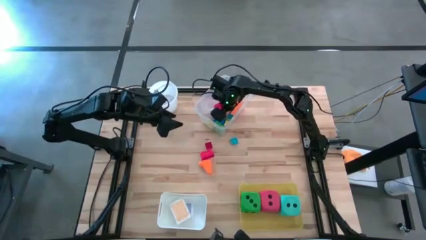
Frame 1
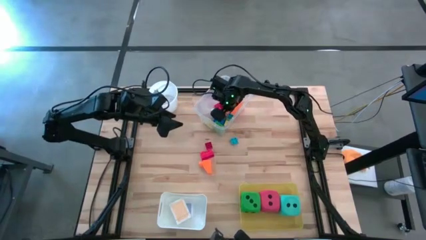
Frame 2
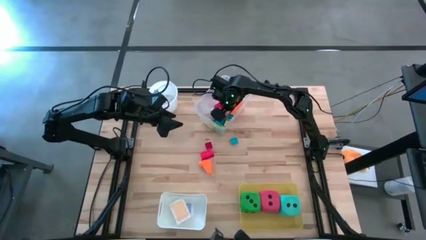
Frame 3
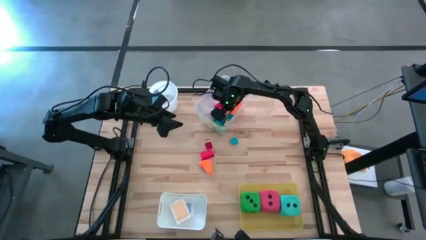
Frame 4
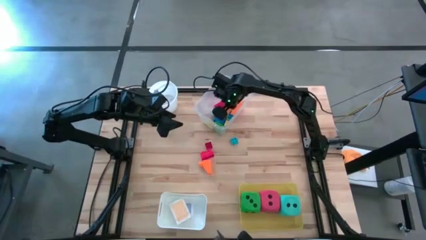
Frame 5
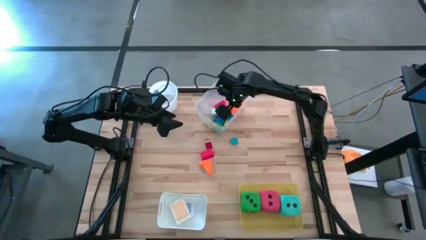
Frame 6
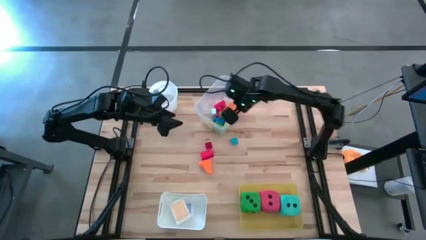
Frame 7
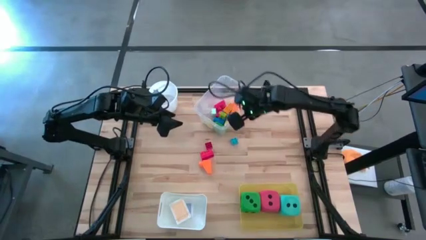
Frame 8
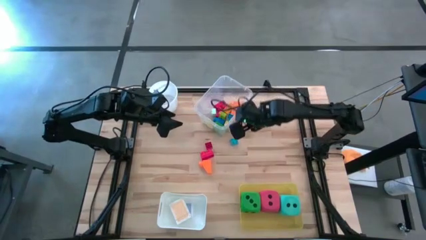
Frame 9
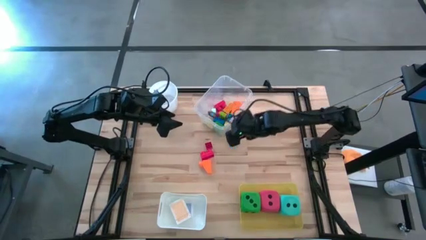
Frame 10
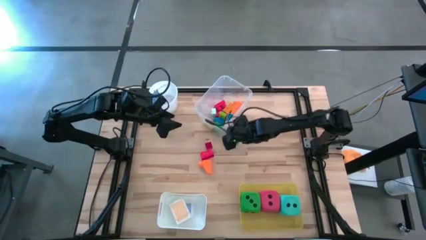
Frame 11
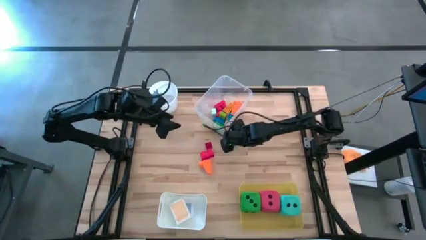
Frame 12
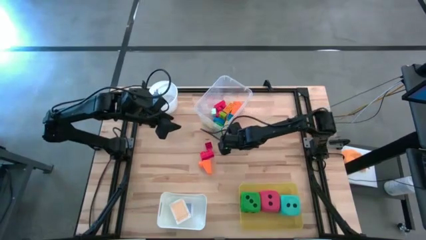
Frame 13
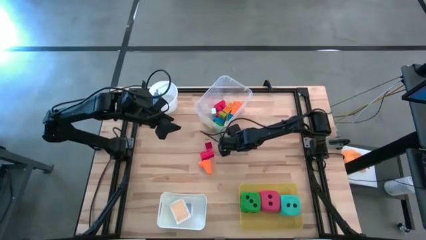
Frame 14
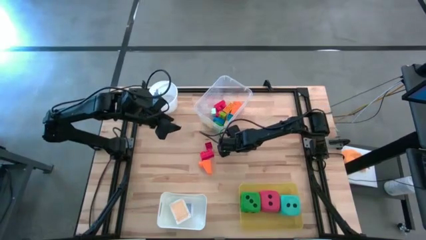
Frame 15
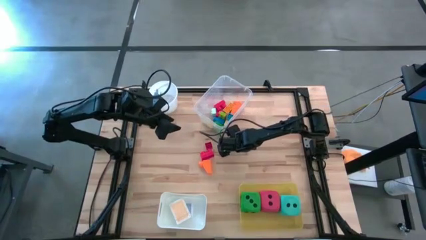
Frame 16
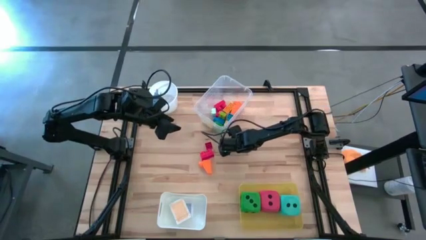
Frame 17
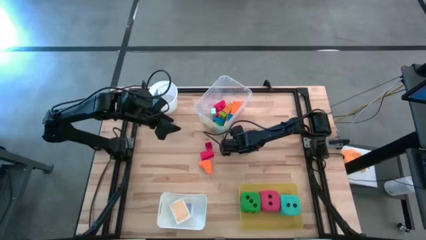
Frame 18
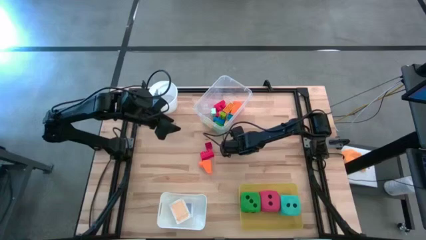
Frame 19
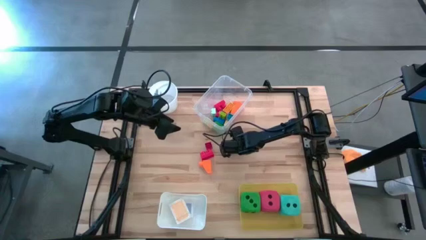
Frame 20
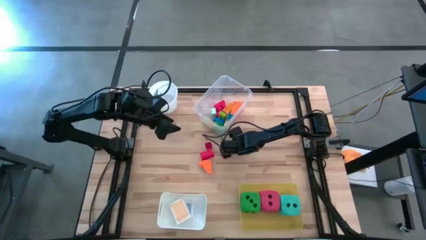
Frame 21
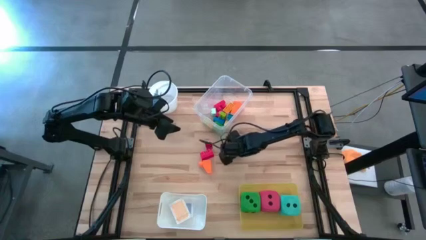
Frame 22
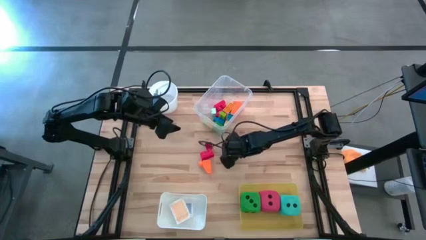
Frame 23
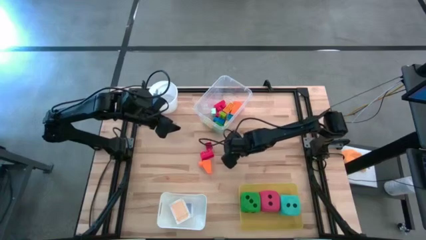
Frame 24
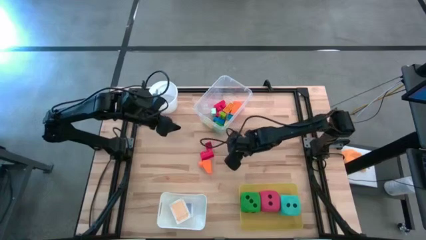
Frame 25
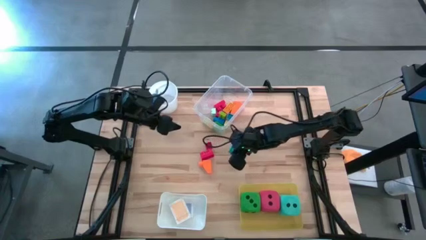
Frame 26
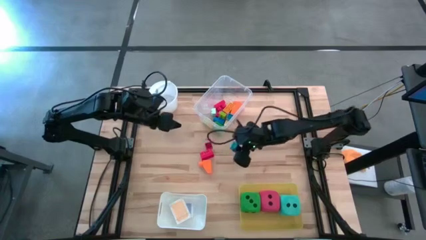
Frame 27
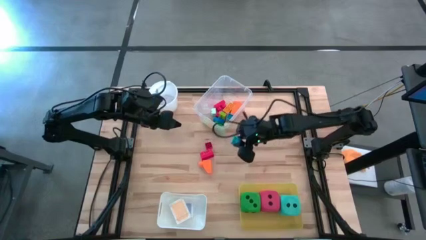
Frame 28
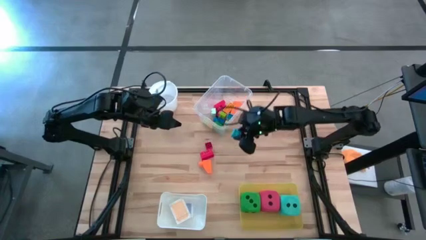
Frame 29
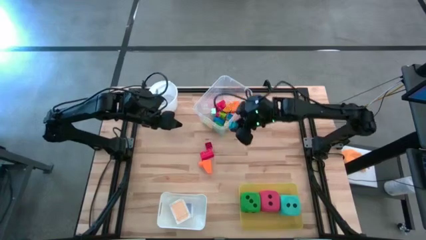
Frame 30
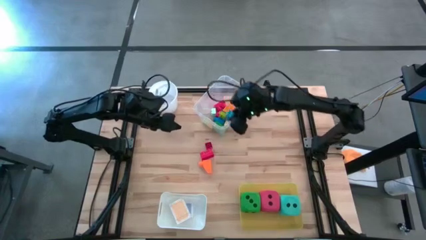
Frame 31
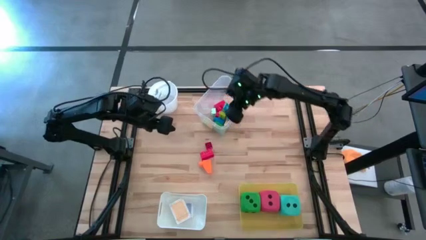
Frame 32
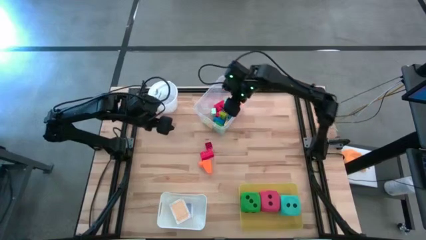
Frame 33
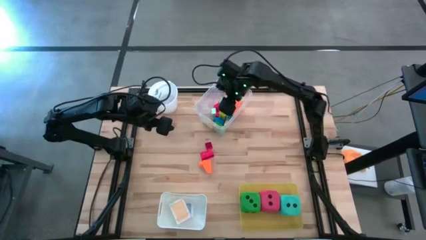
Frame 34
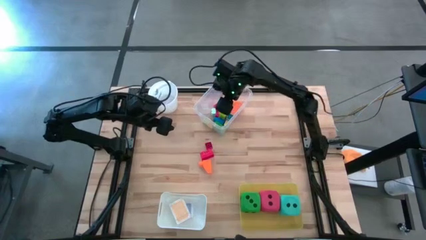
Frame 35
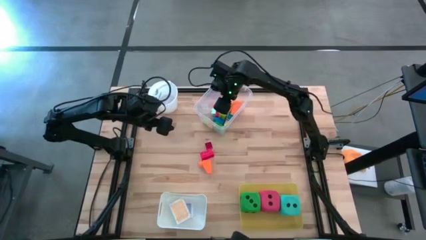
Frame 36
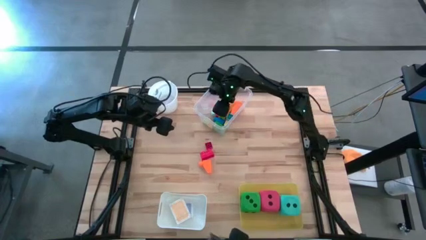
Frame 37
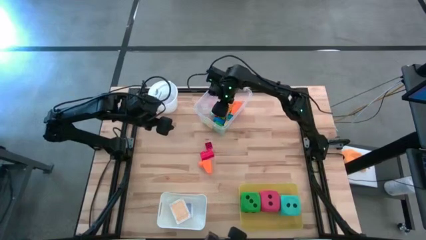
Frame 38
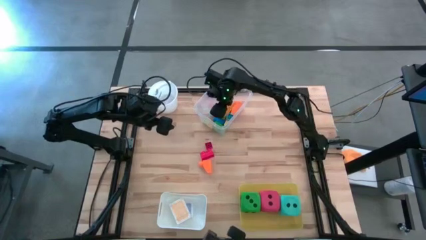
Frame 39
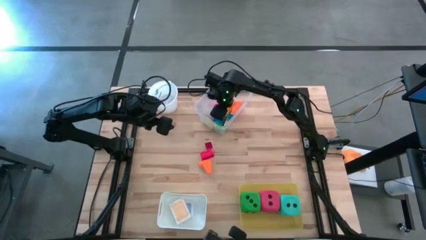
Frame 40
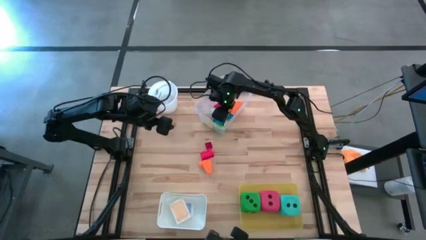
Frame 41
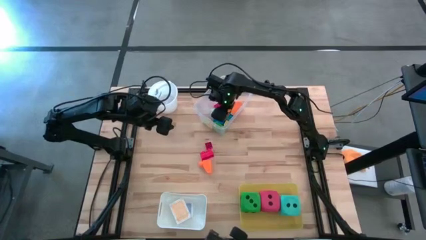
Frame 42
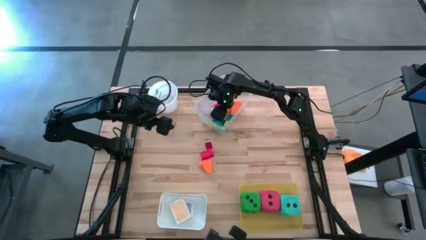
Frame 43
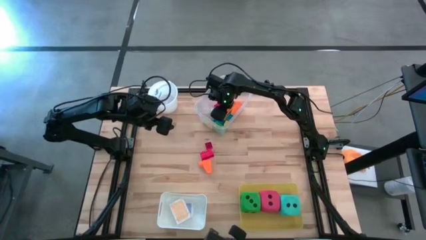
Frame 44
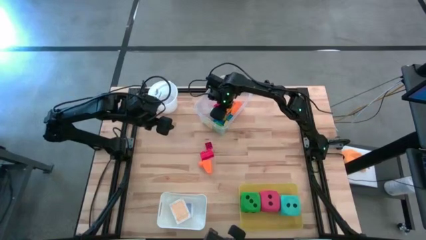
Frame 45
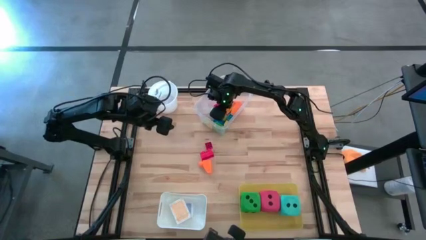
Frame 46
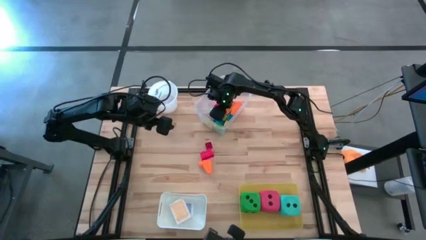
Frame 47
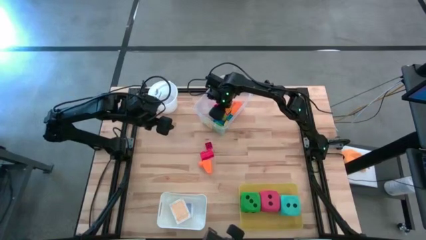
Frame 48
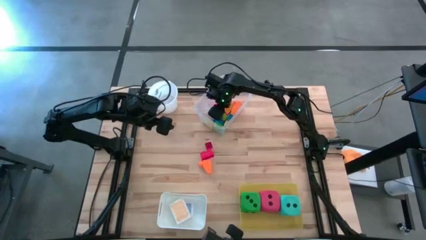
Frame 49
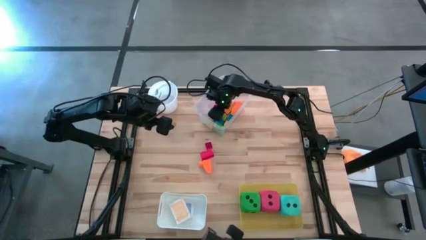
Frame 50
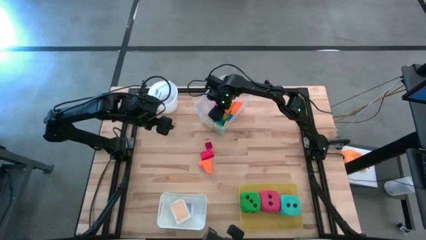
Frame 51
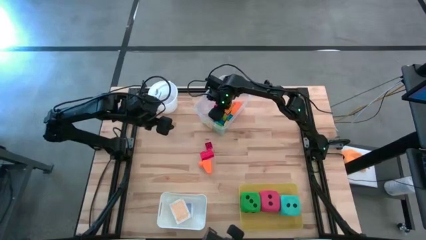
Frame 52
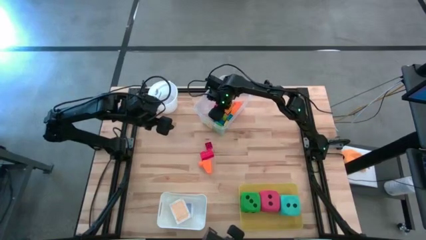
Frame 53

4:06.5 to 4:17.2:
Task: Pick & Place Toys
Put the blue game piece into the transparent bin

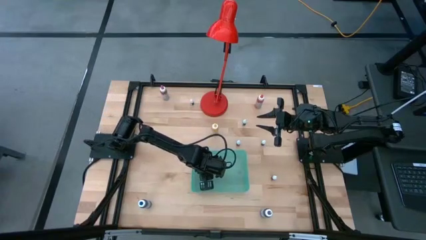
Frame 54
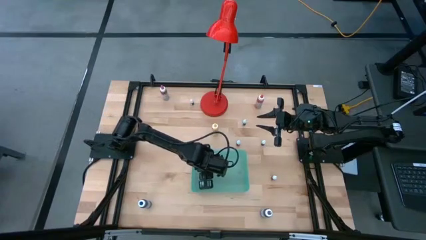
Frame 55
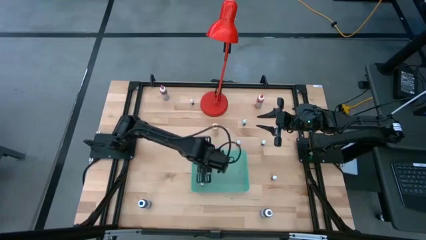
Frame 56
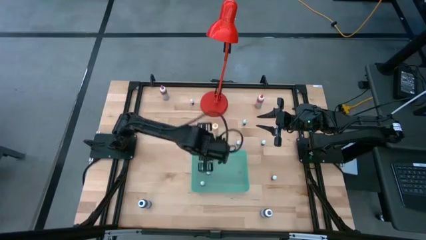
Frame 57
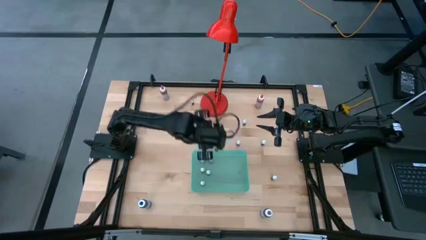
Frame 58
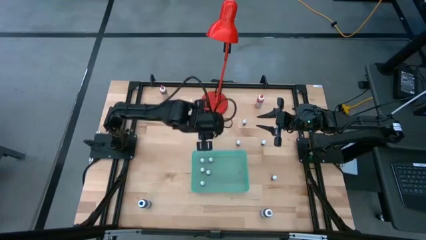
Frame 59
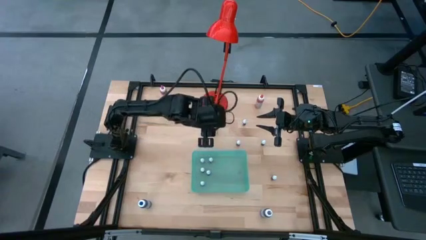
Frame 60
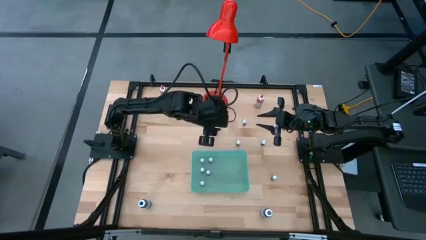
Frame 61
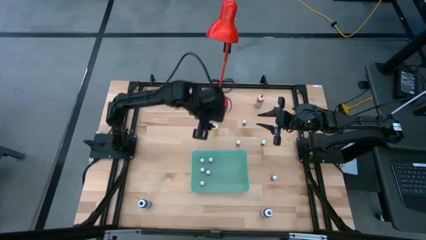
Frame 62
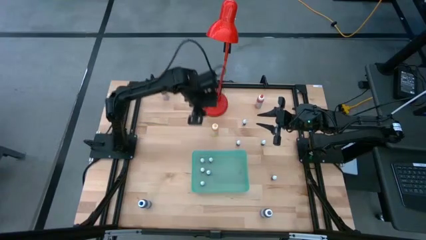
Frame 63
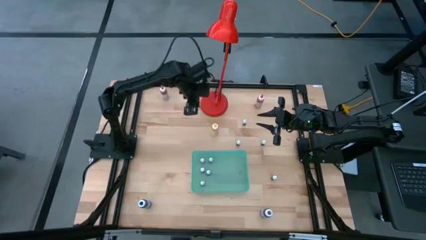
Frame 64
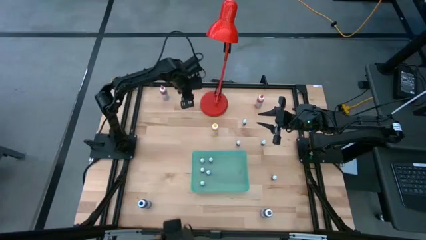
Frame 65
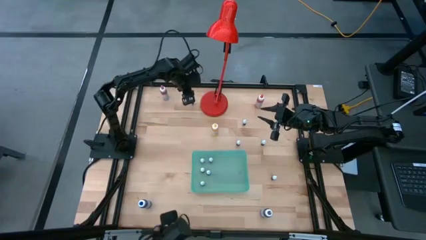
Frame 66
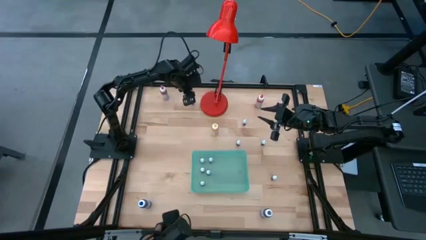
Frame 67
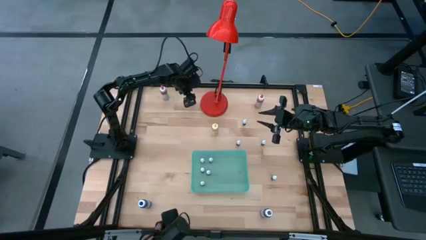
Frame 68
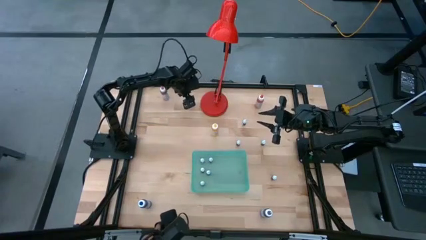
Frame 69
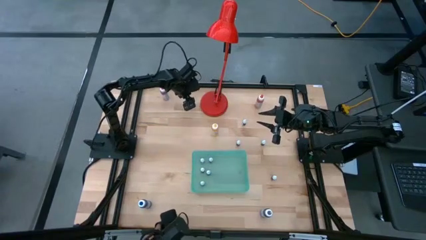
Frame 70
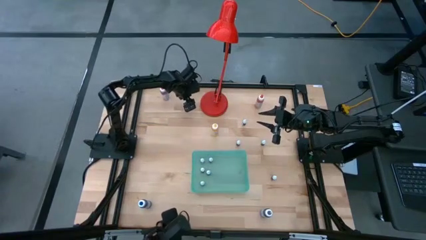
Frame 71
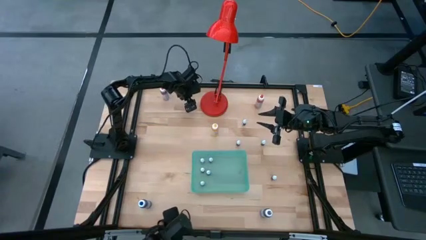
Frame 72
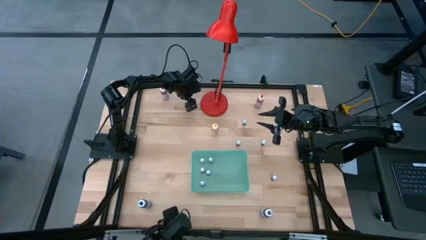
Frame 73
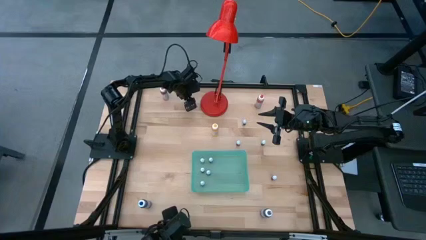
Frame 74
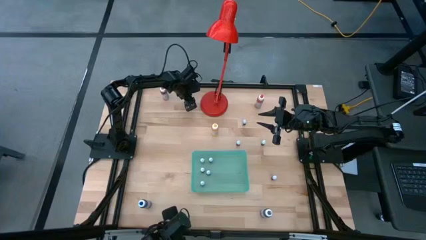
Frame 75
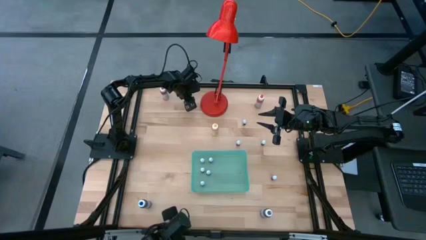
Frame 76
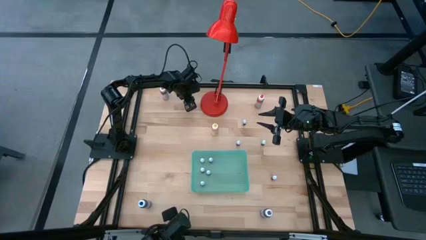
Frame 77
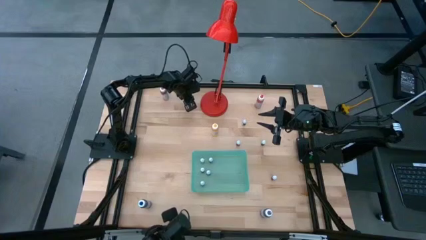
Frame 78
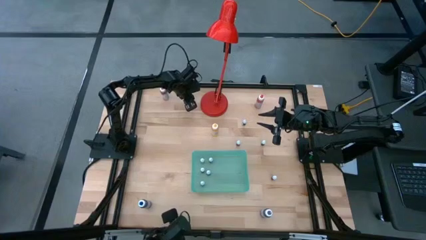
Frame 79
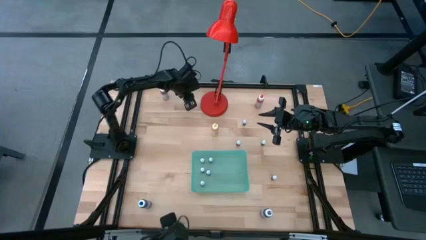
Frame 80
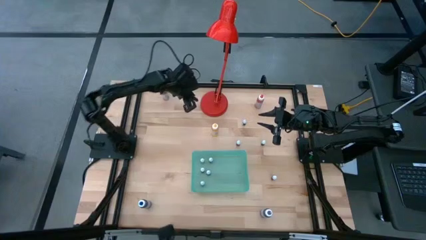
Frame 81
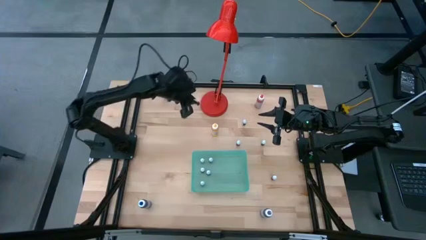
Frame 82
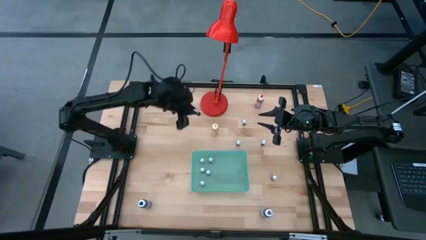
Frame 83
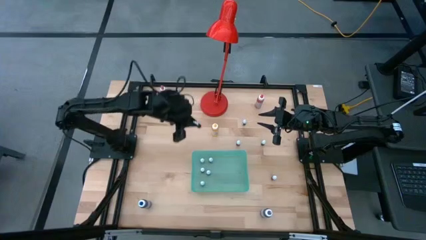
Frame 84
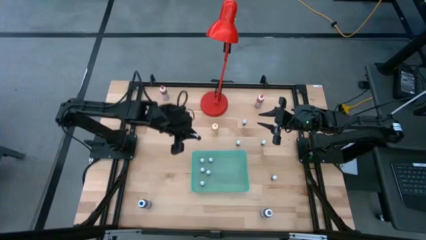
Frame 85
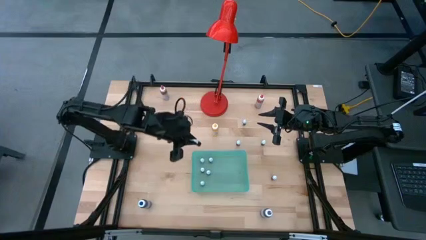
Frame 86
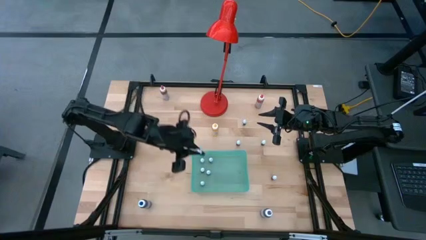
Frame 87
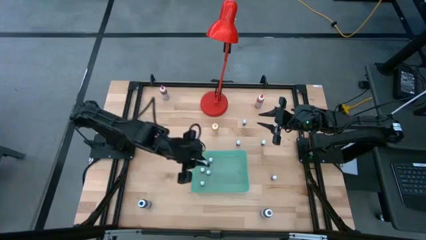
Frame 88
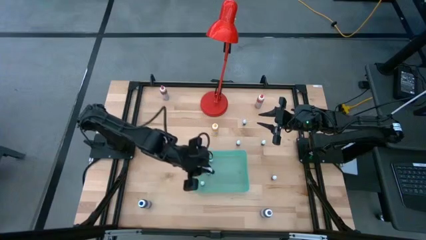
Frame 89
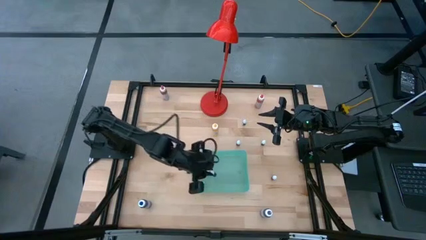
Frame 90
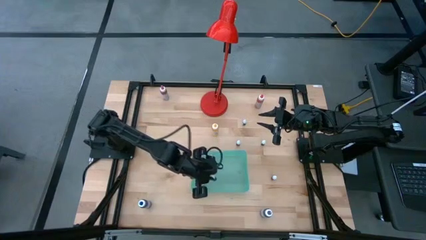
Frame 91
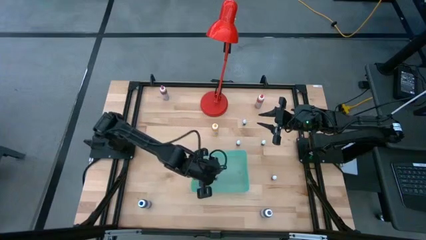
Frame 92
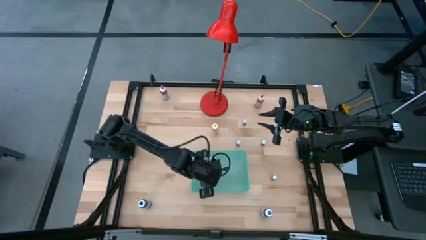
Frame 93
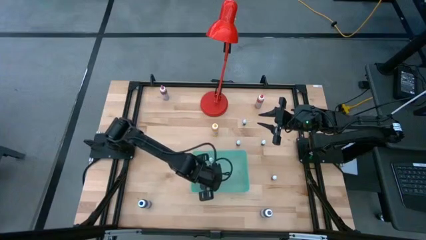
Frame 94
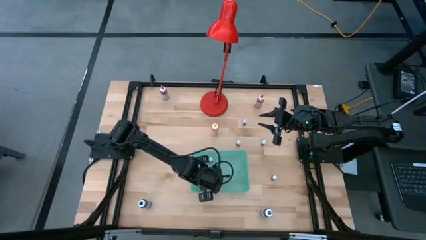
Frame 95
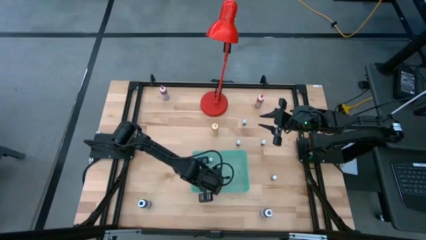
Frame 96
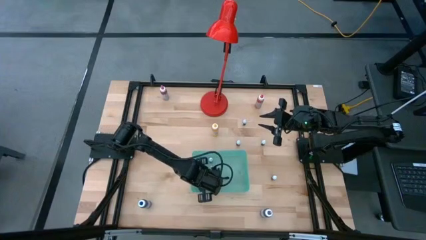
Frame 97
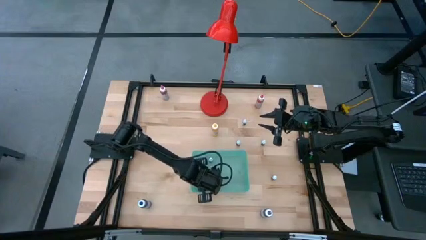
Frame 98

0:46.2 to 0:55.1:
Task: Pick & Place food coloring
Put the small black food coloring bottle into the blue bin
